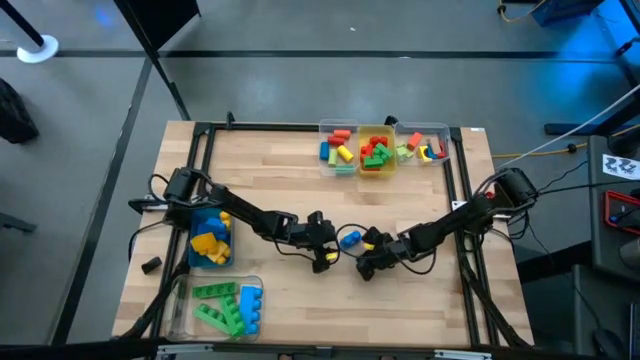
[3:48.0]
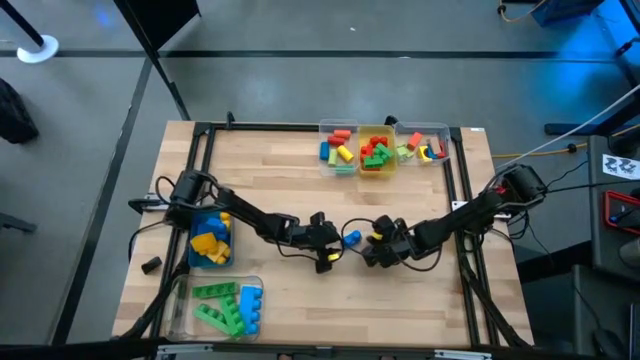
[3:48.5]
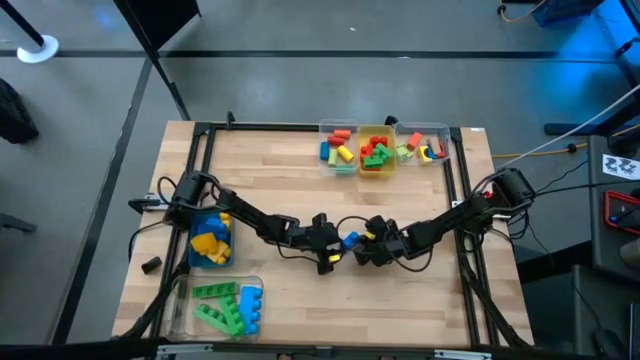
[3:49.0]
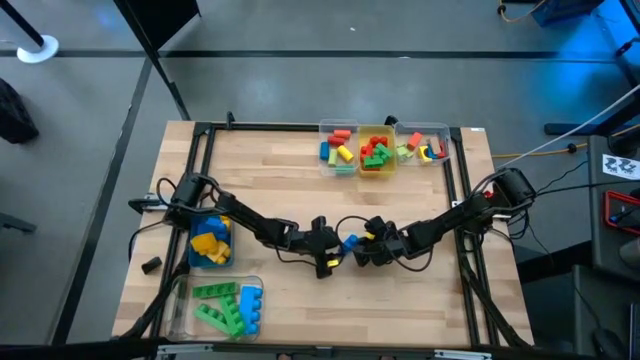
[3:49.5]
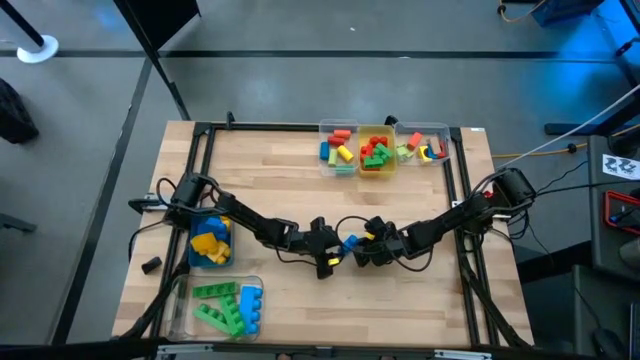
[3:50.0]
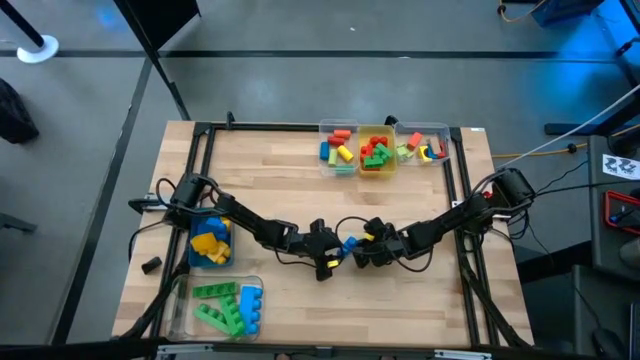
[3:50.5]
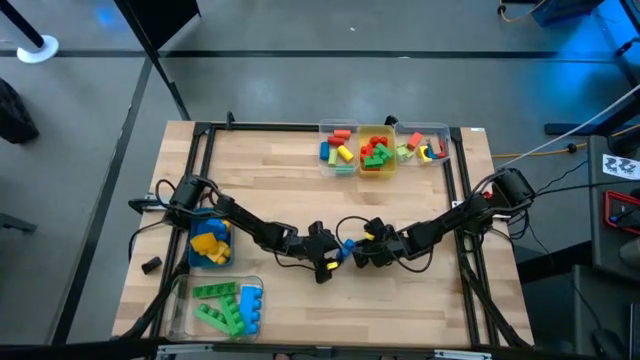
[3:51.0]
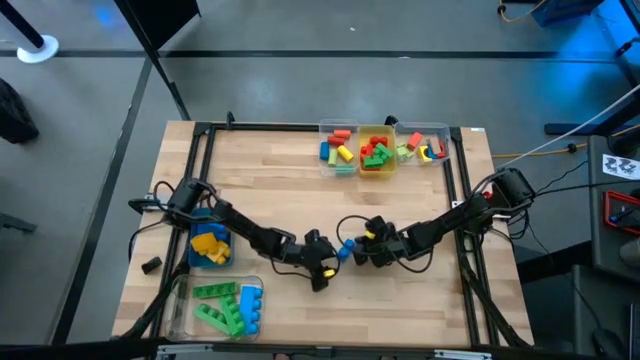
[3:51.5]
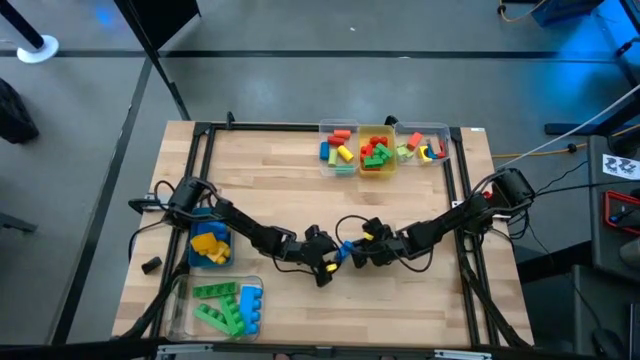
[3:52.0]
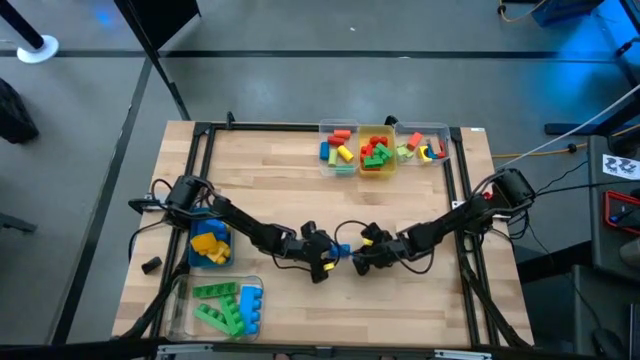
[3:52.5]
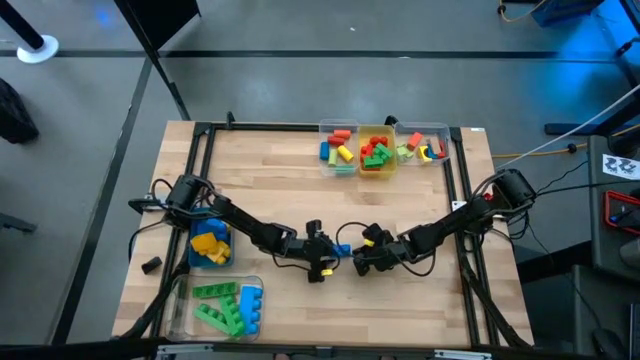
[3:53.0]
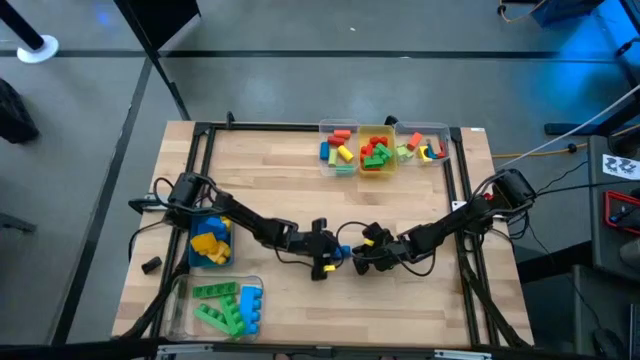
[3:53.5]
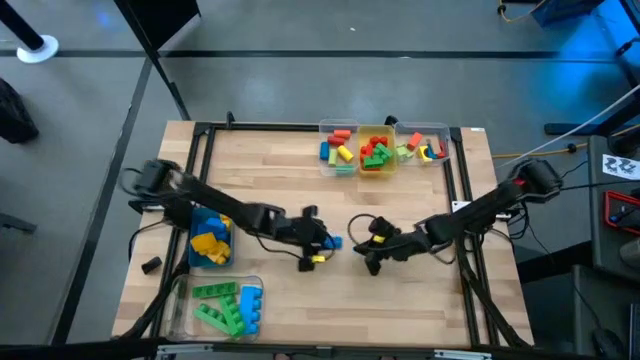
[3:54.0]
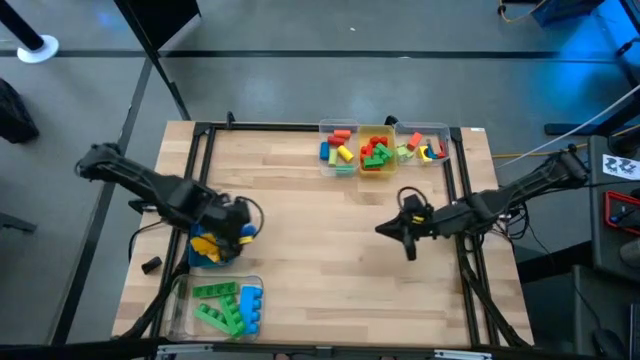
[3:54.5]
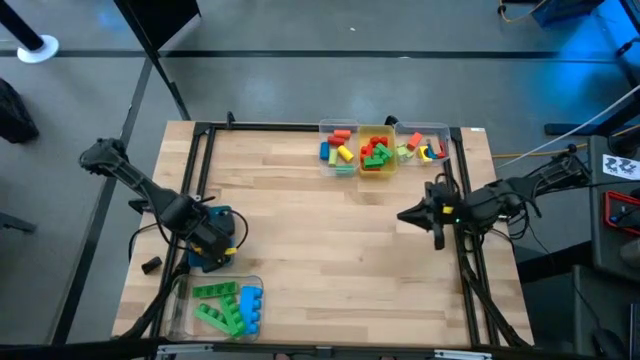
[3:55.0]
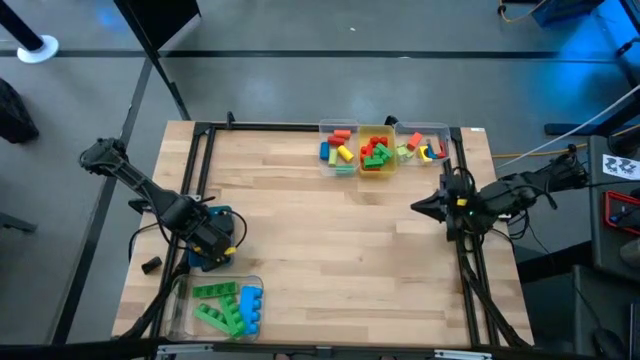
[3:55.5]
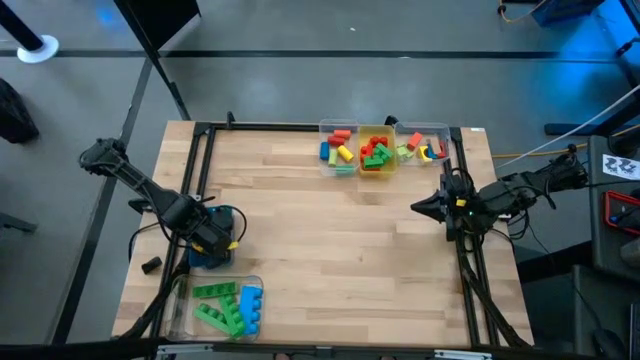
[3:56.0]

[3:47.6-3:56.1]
Task: Sort blocks by size
Put the blue 2 stud game piece into the blue bin

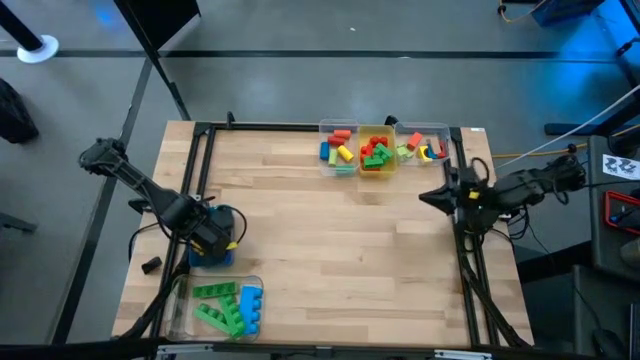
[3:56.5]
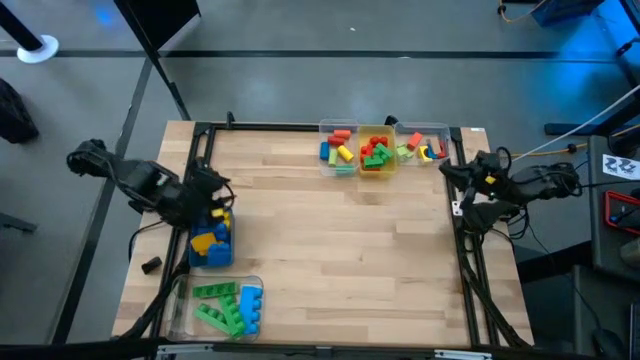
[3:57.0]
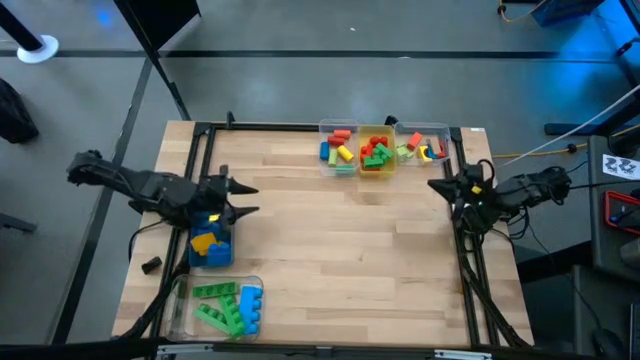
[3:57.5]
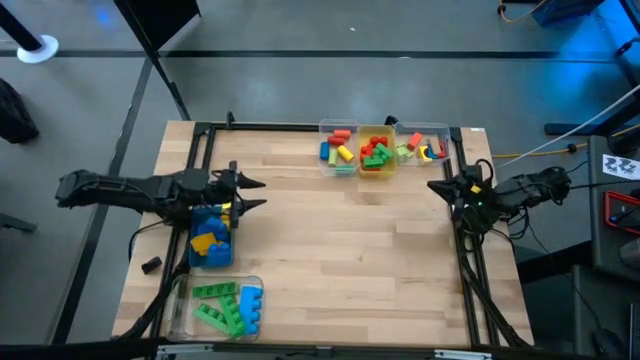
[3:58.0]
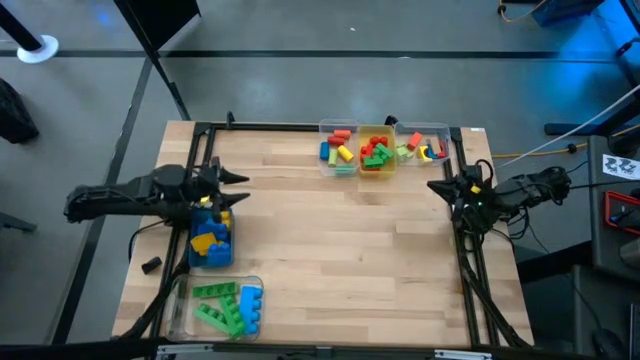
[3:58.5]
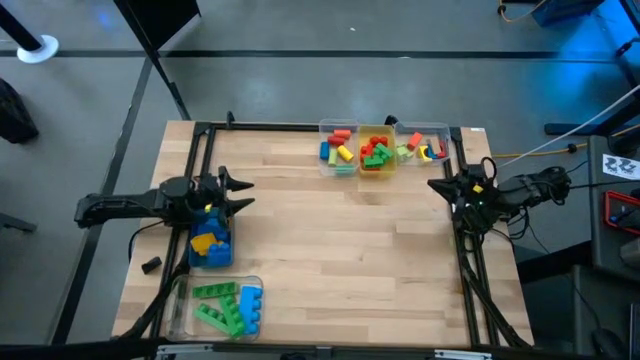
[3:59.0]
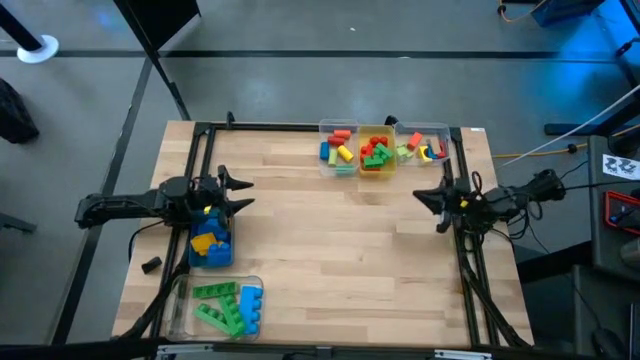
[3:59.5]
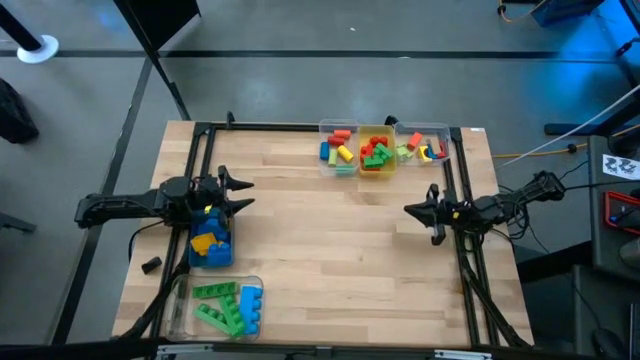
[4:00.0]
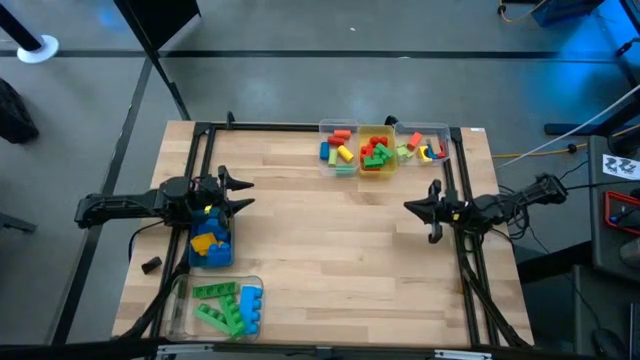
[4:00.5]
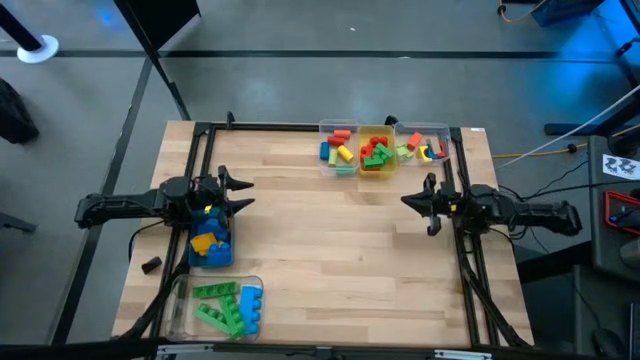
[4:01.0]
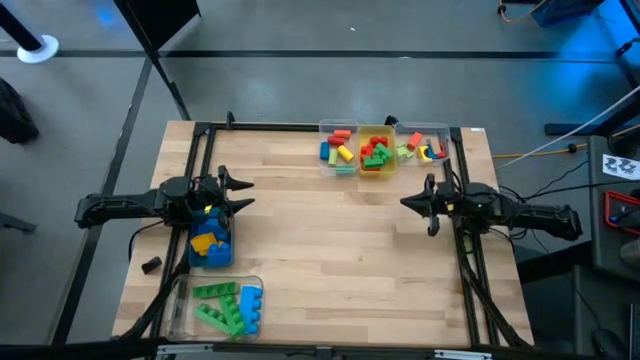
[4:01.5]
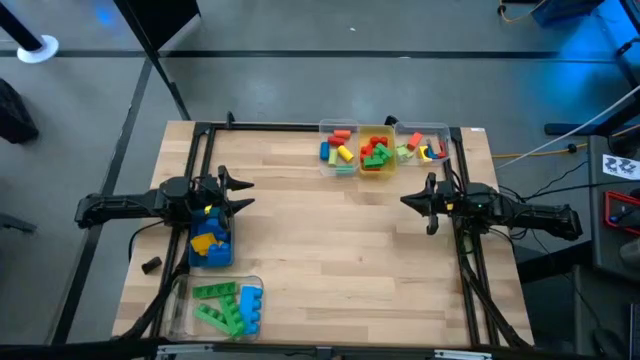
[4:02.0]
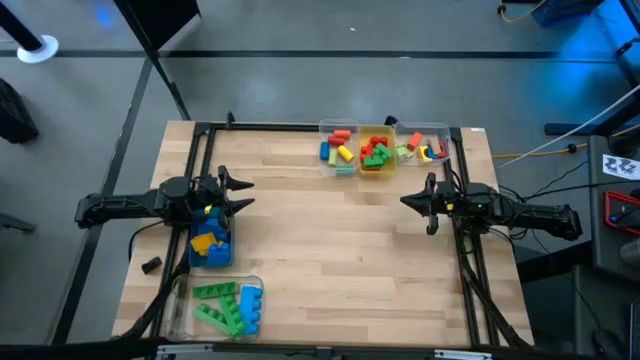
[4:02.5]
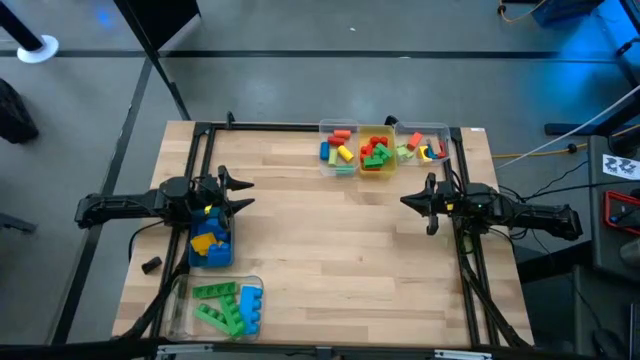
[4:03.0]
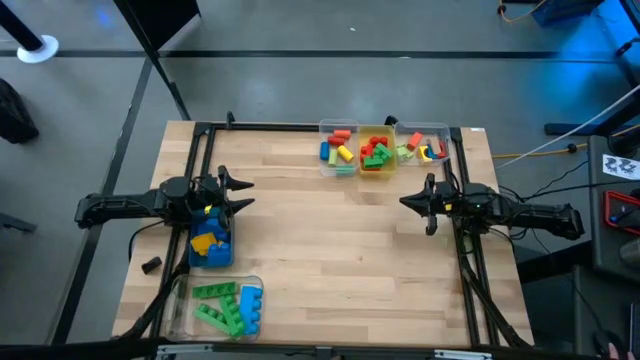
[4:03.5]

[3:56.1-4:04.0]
Return to Home Position

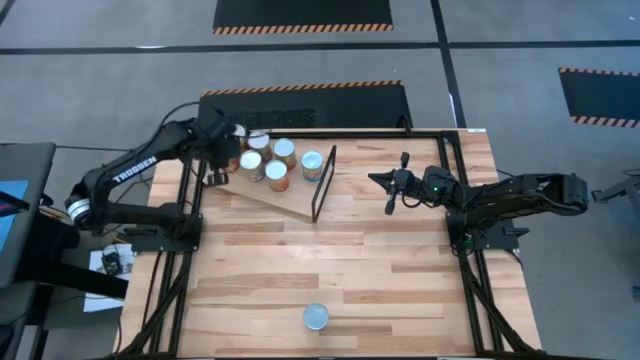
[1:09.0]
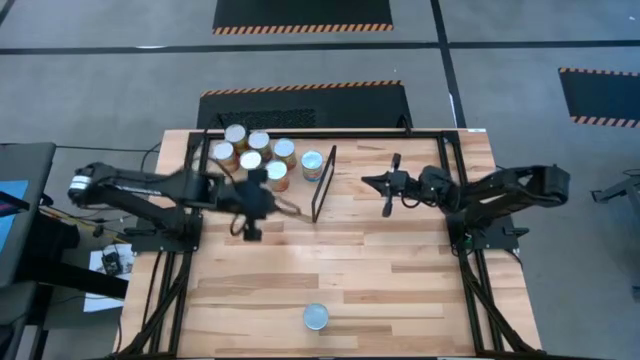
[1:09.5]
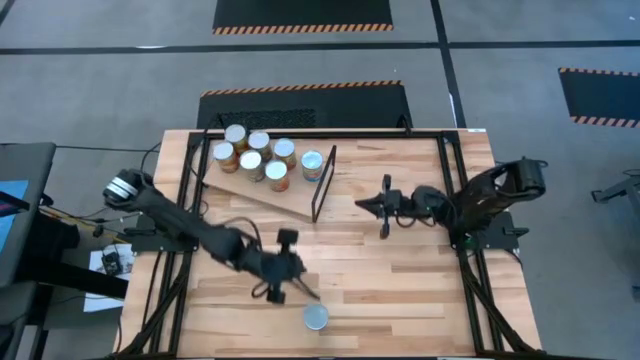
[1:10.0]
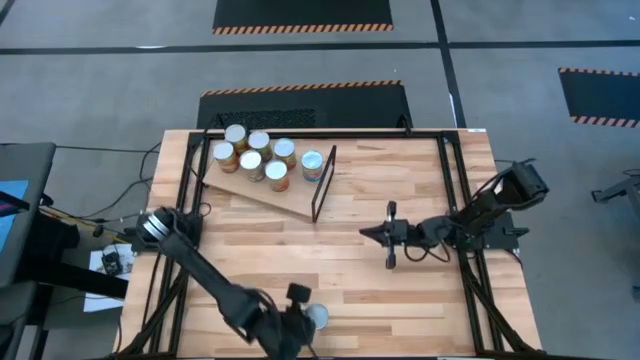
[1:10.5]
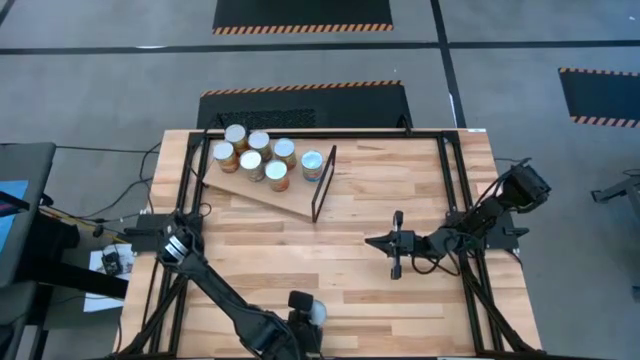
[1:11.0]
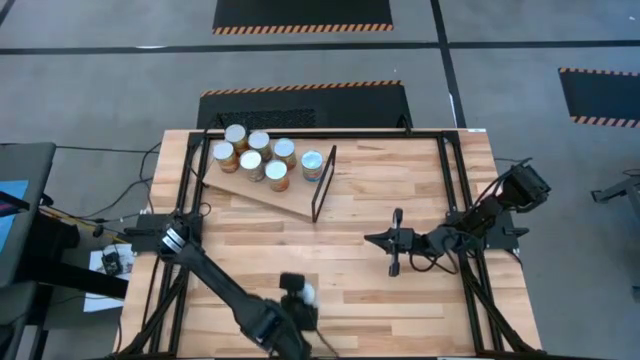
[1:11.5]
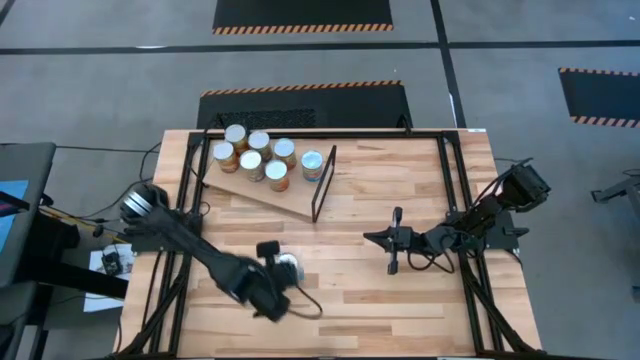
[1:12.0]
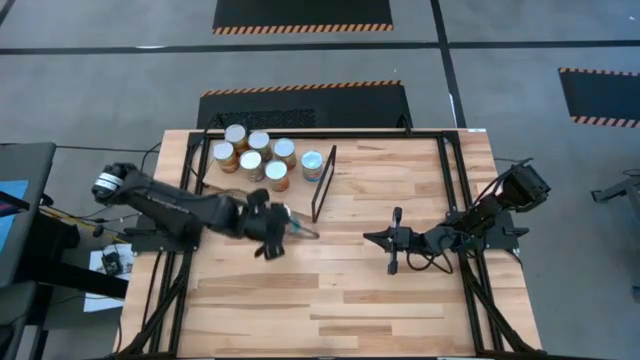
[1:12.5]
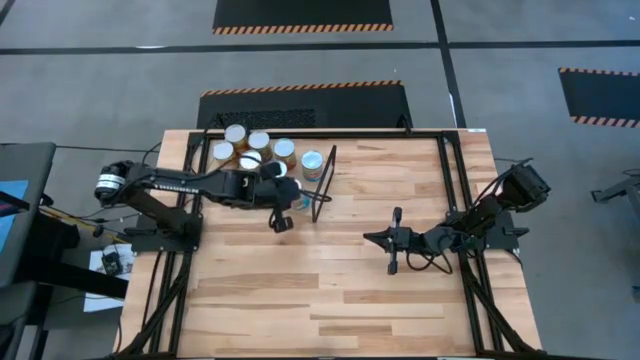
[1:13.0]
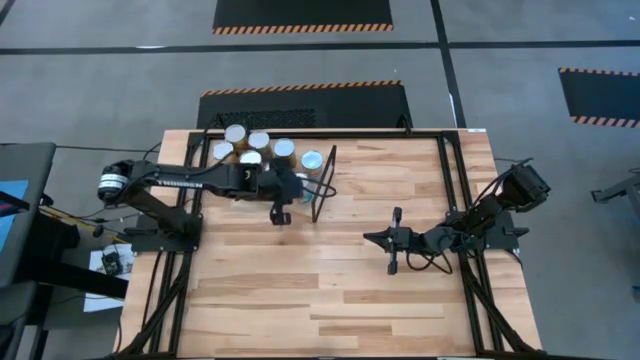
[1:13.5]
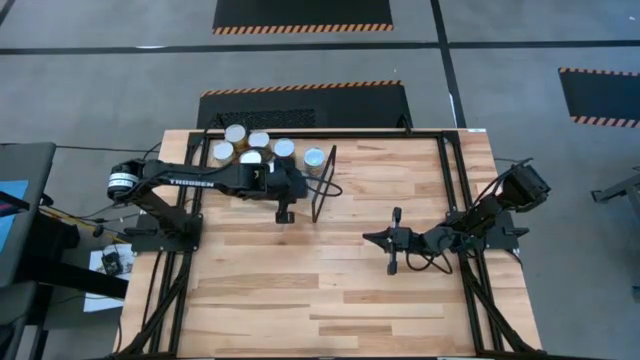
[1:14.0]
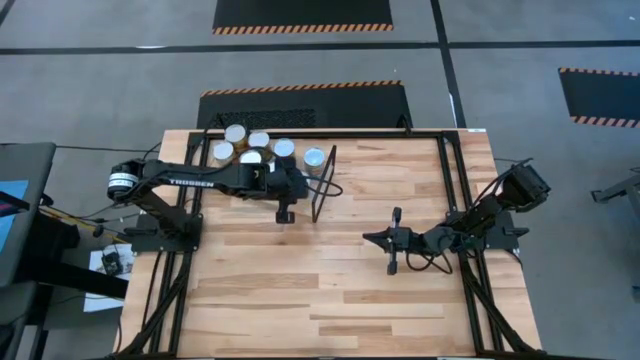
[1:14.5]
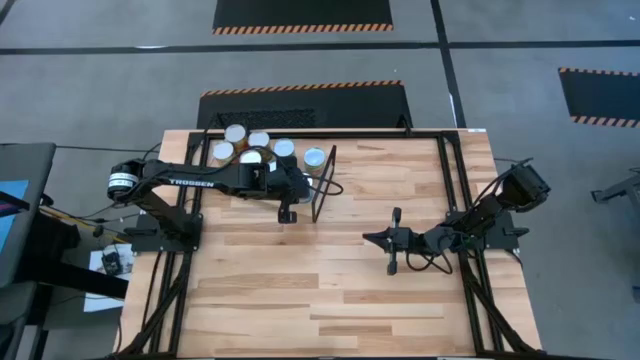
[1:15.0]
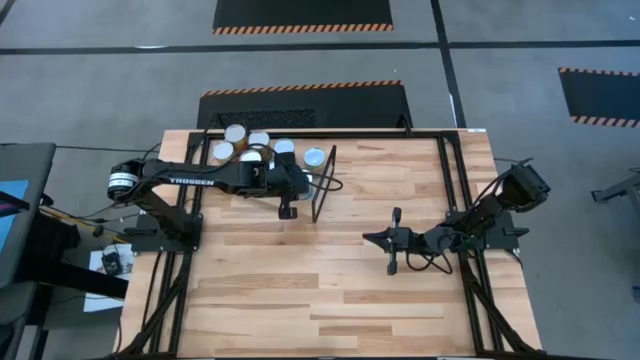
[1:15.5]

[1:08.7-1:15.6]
Task: Pick and place cans onto a shelf
Align the canned tomato with the other canned tomato on the shelf
